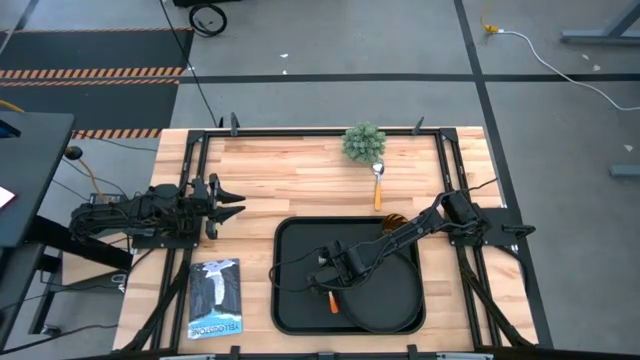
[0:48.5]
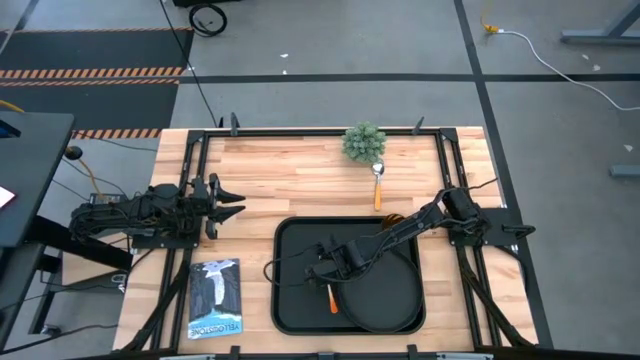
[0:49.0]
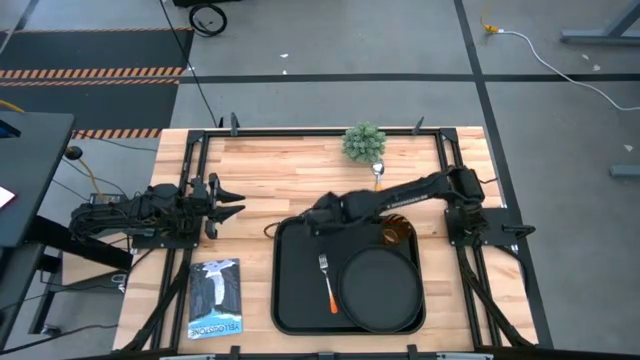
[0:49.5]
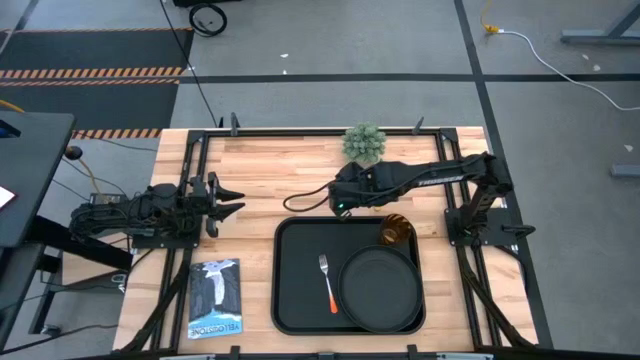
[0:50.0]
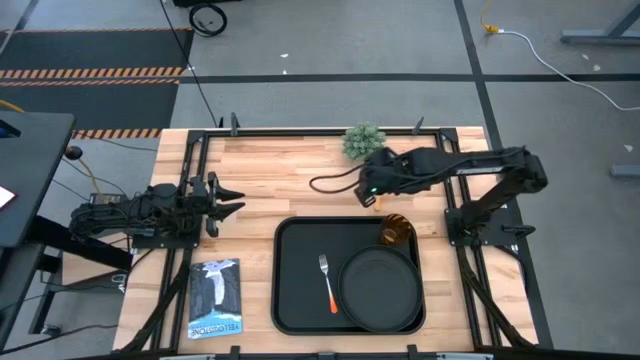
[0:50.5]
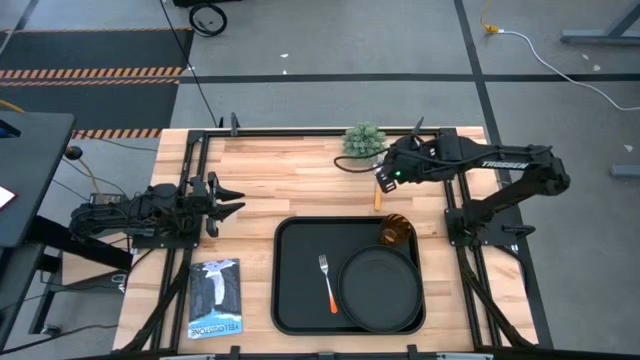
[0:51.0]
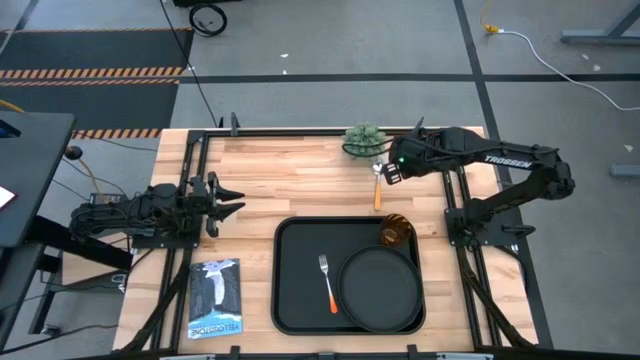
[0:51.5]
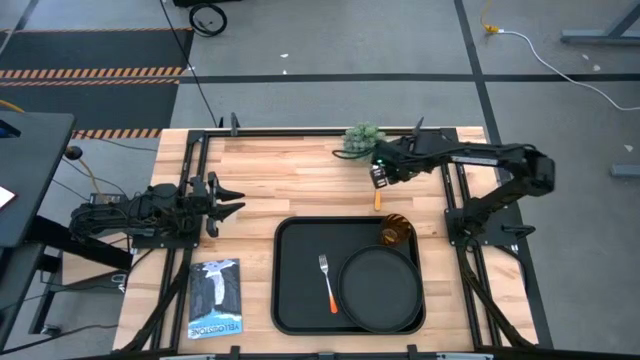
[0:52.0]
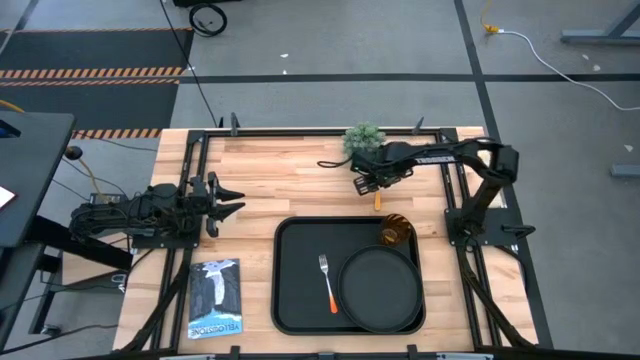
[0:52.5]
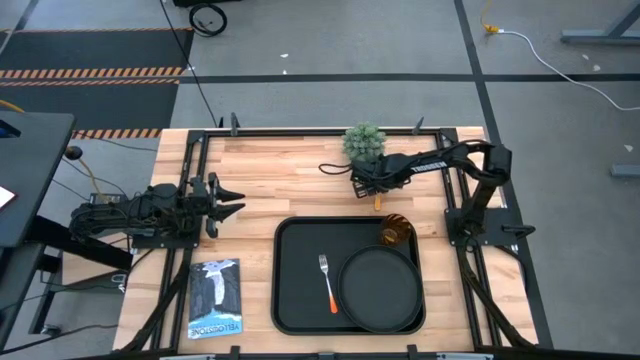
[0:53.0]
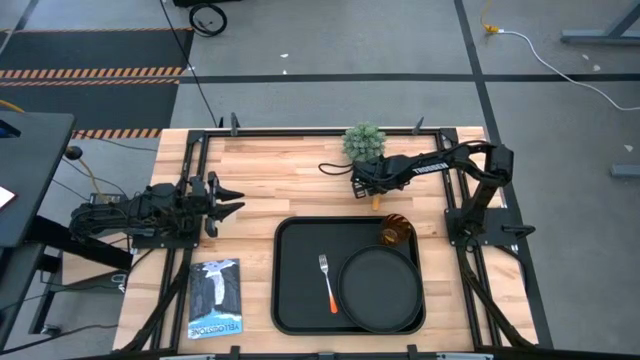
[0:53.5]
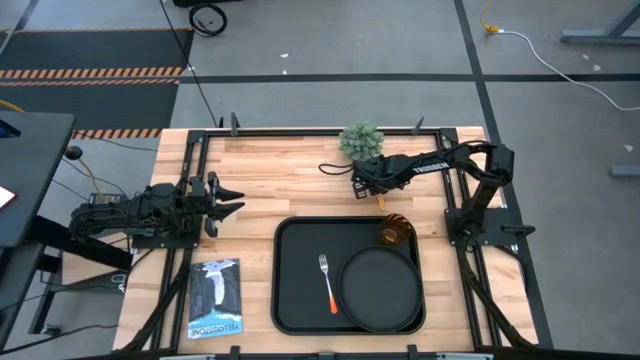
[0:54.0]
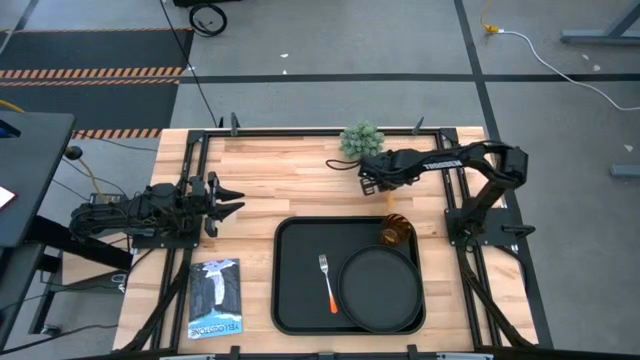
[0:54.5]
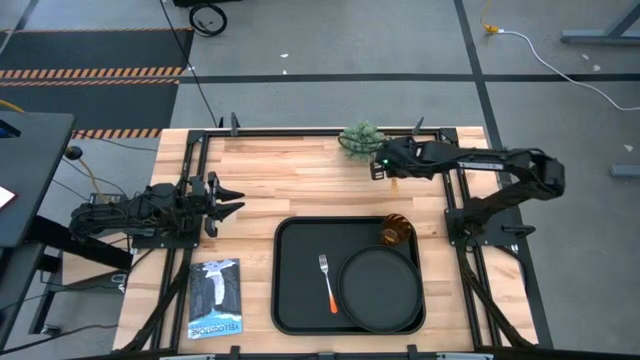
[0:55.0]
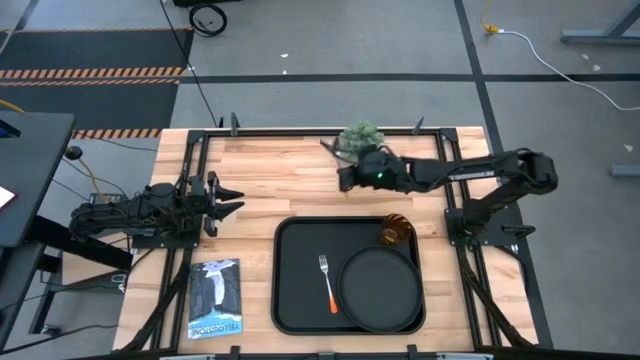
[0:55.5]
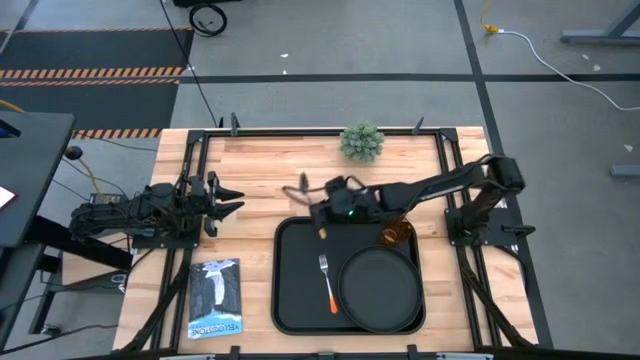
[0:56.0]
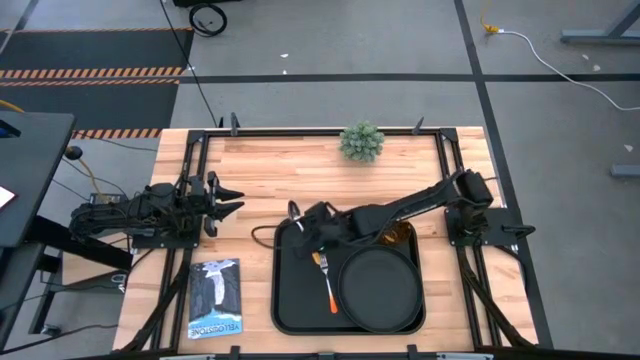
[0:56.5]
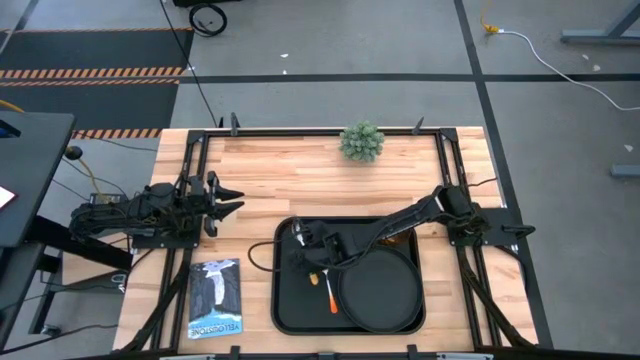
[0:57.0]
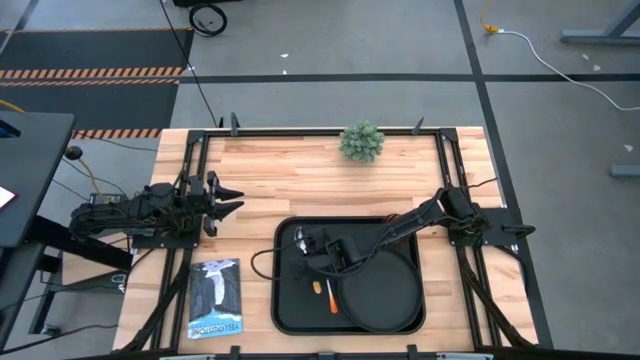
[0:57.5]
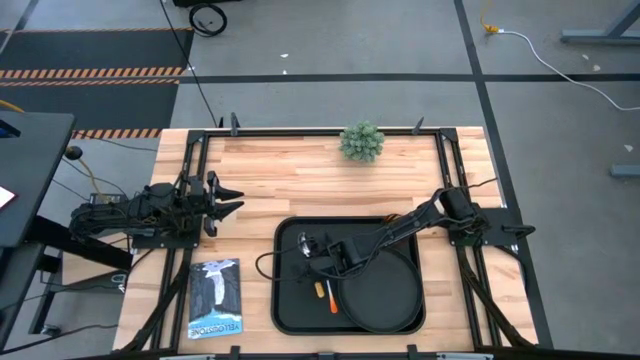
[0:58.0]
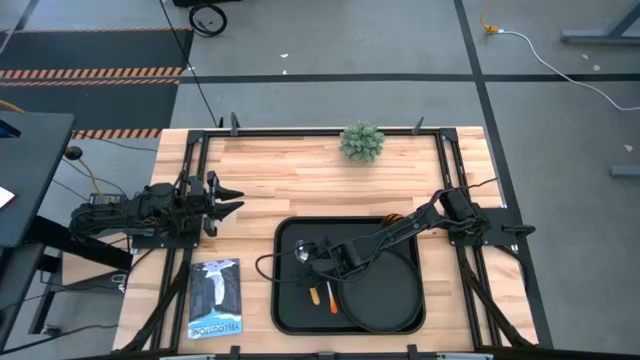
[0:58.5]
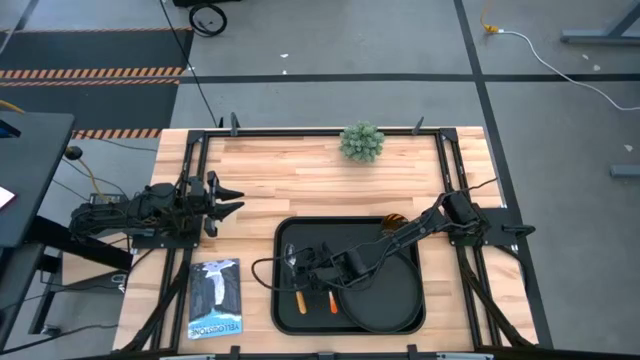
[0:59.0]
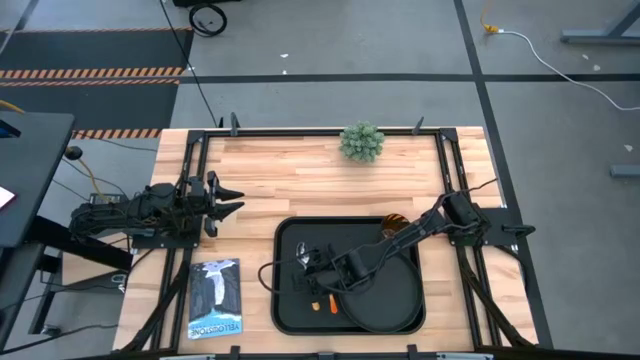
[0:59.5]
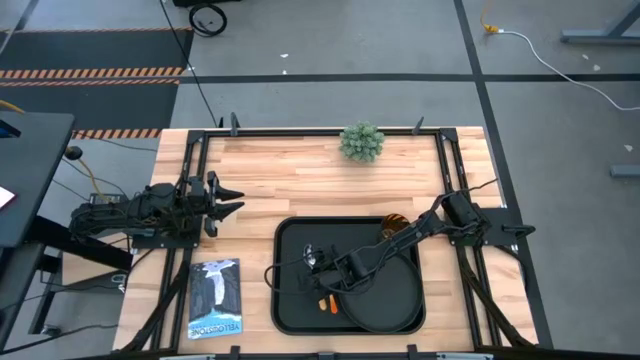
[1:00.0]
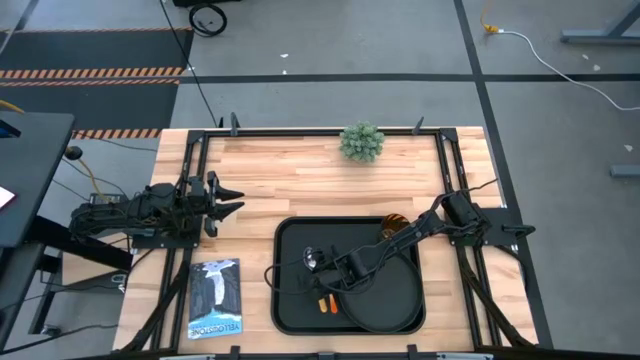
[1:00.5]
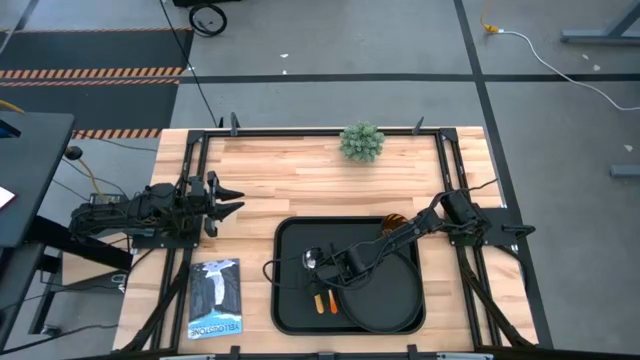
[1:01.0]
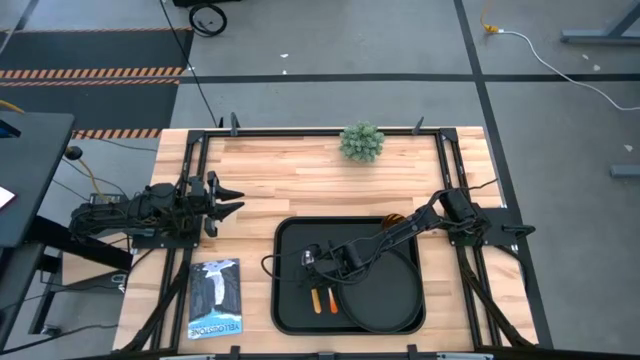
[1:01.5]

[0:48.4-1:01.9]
Task: Pick and place plate/cup/fork/spoon on tray
Put the yellow spoon on the black tray to the left of the orange fork

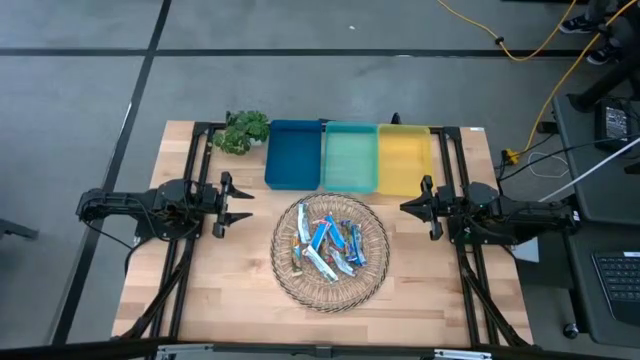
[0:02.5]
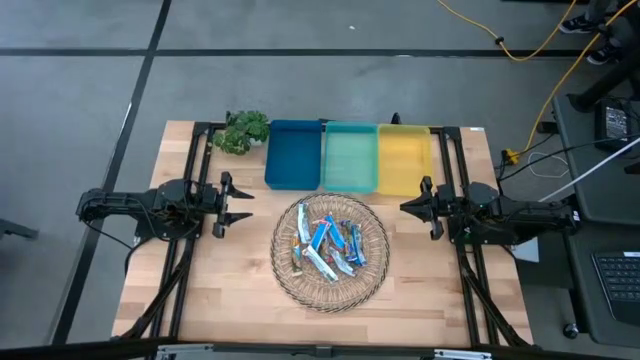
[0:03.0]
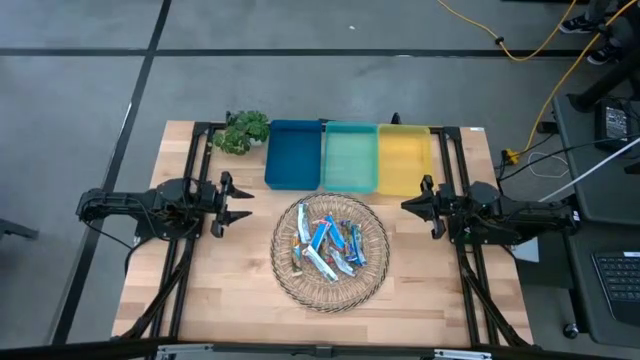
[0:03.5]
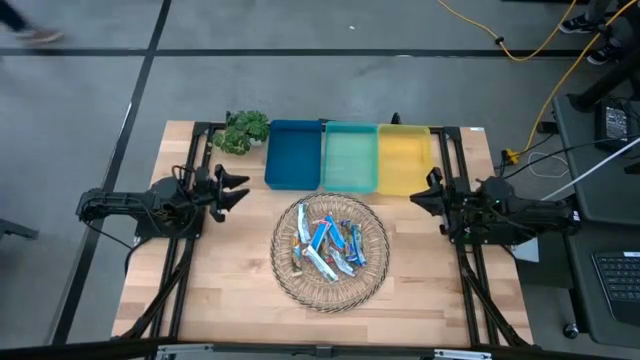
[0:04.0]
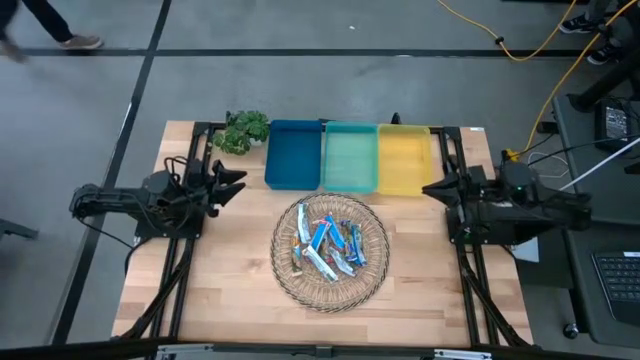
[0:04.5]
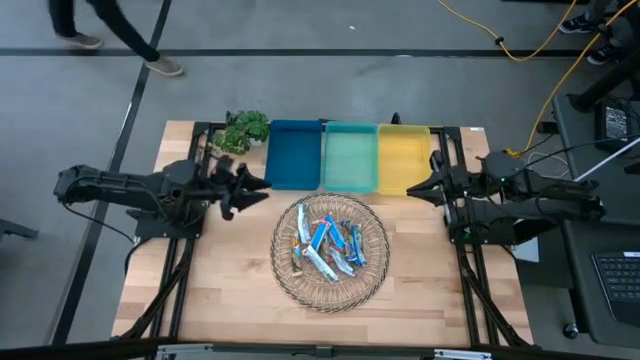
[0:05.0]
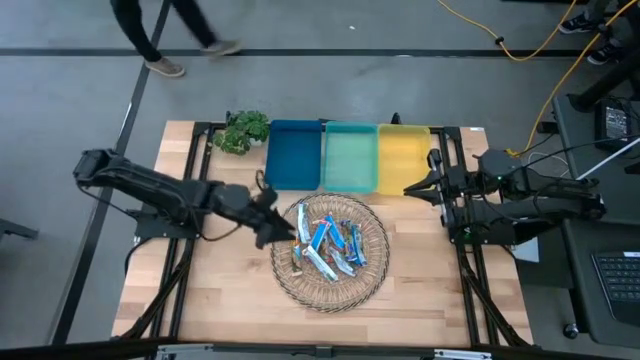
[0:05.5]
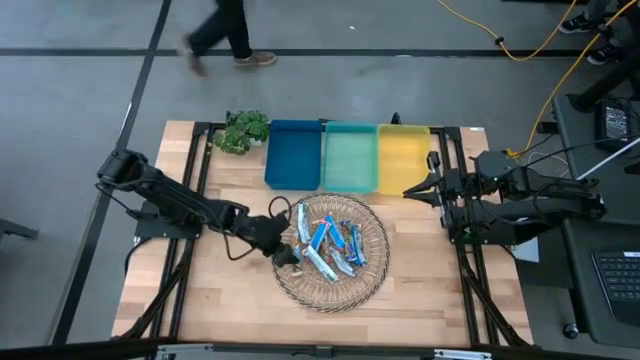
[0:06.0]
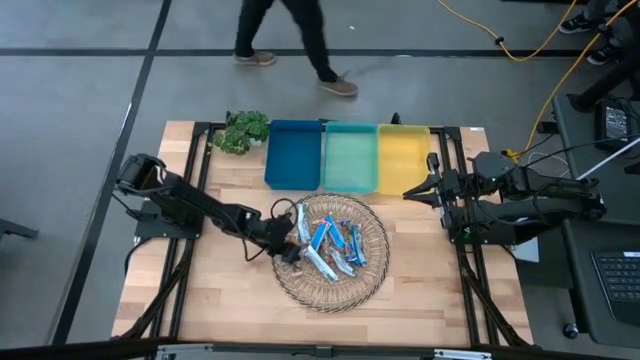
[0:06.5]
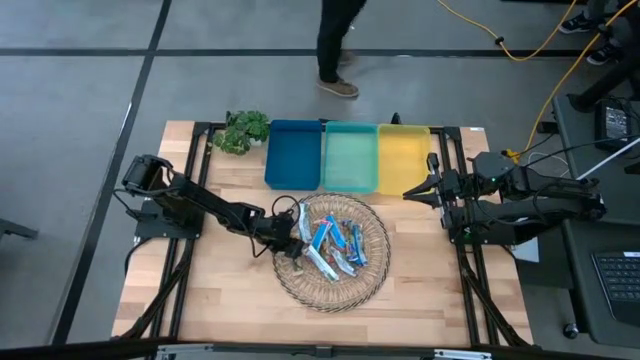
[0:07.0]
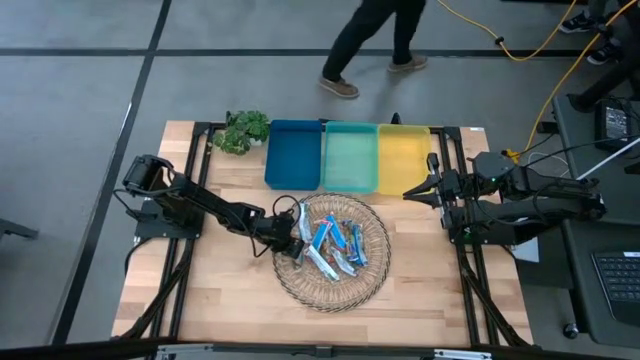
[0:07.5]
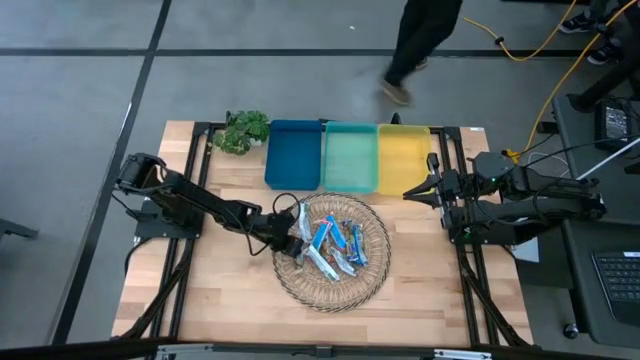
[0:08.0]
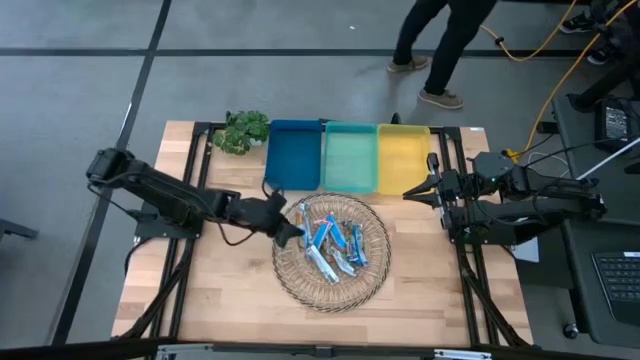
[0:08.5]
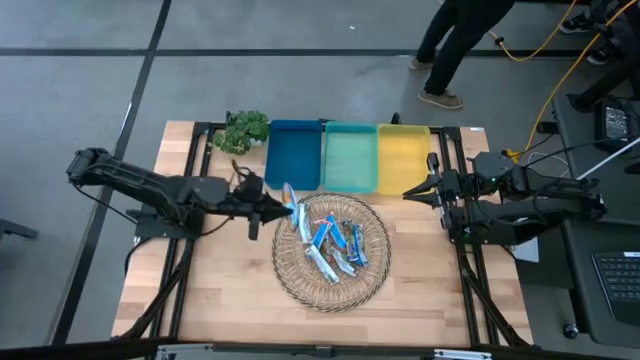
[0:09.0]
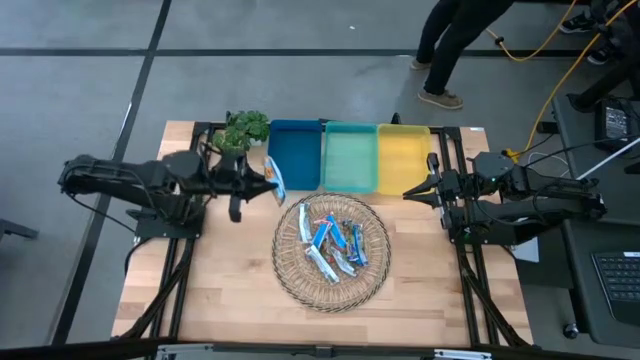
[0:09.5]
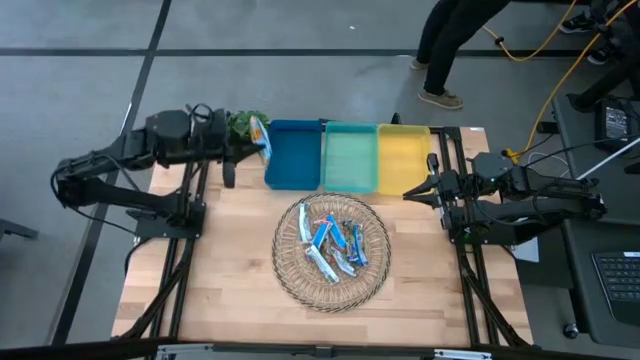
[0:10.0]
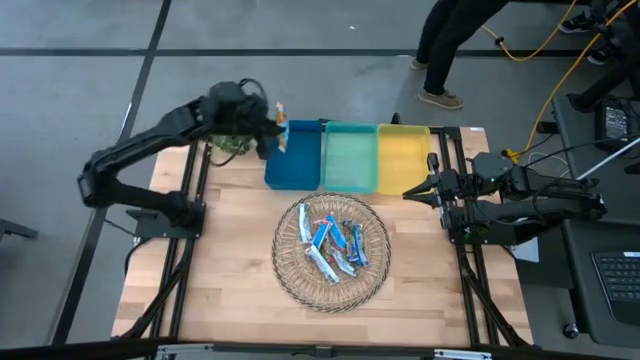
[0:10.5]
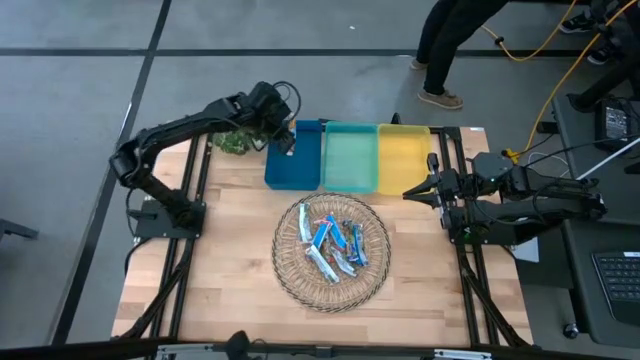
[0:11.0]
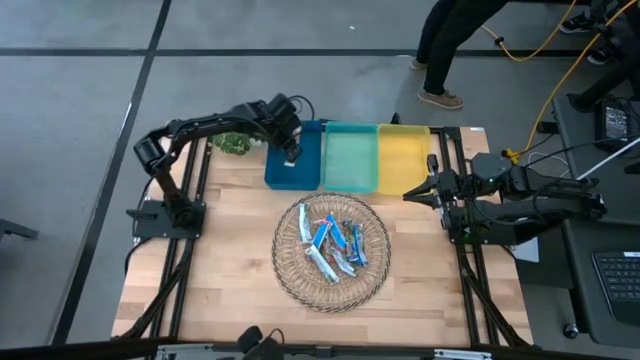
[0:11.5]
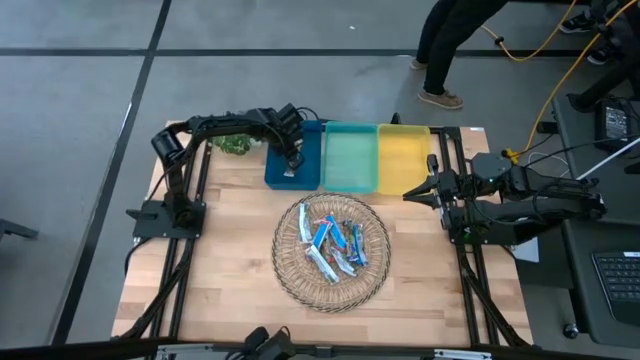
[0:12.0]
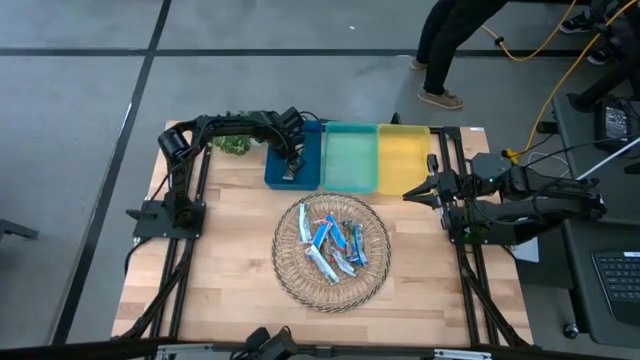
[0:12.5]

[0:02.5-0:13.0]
Task: Pick and place Granola Bars by type
Put the yellow granola bar into the blue bin
